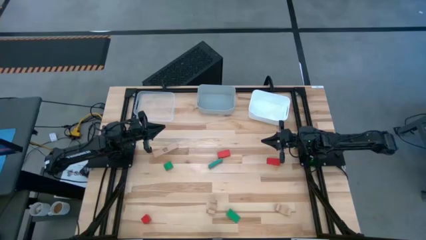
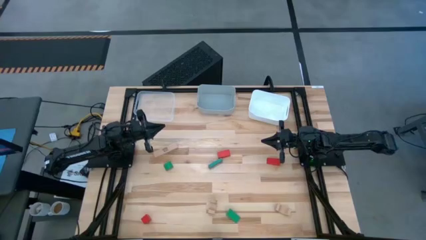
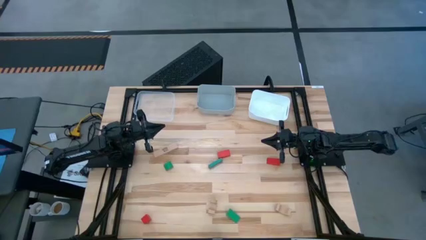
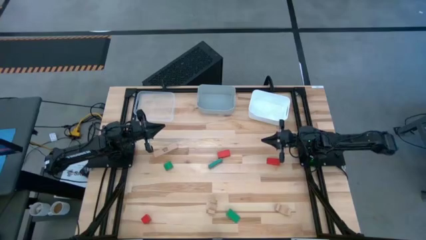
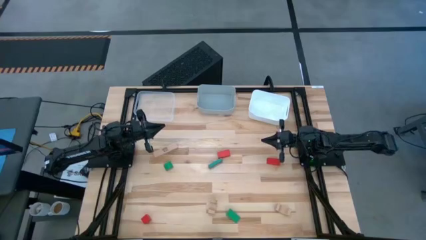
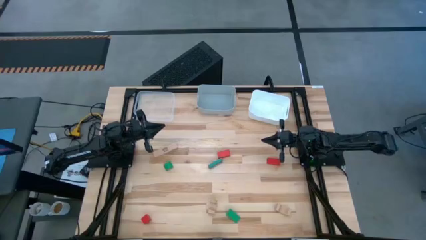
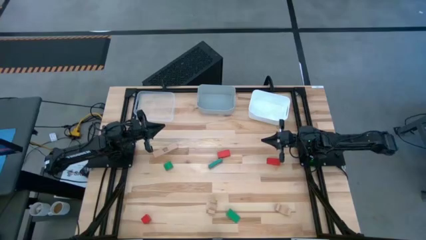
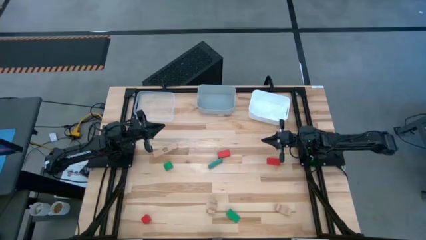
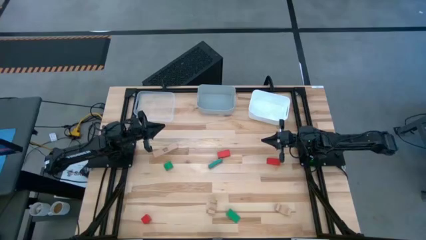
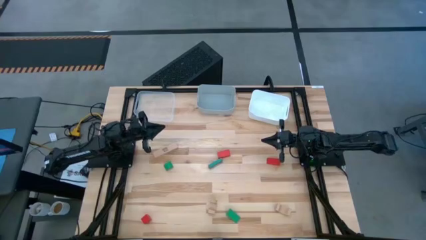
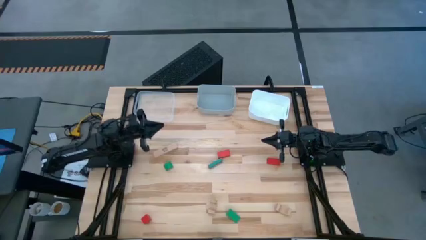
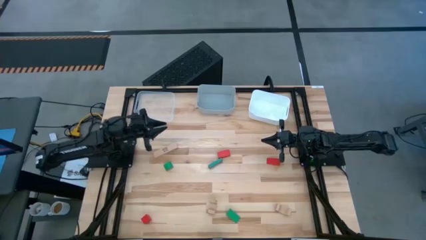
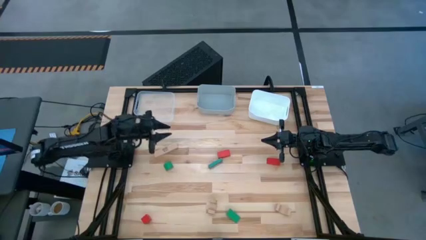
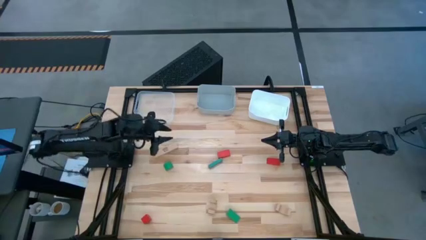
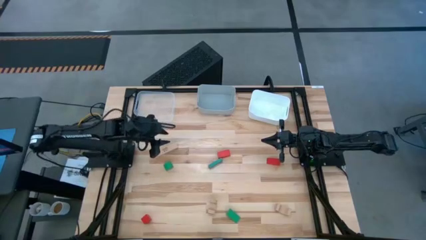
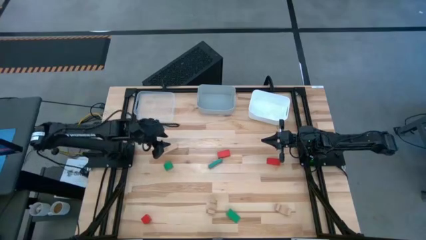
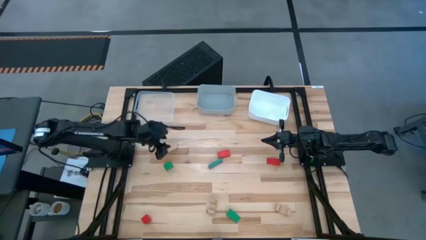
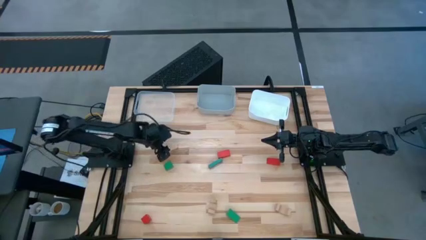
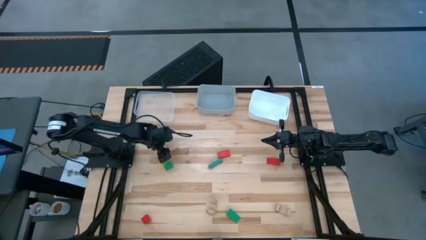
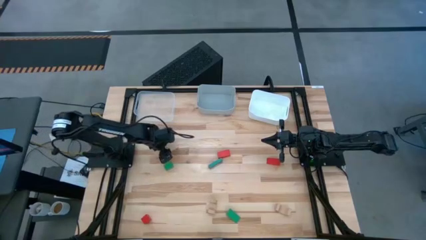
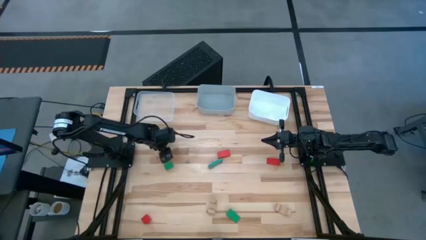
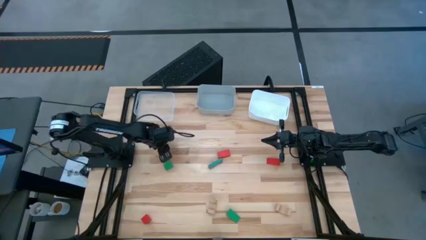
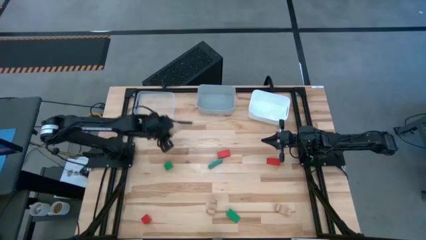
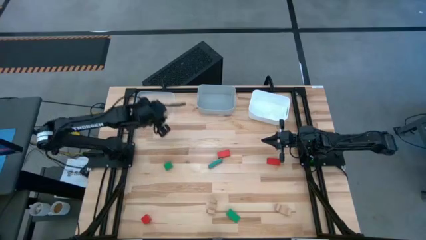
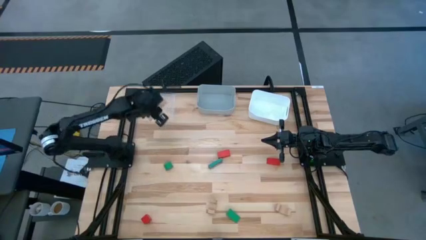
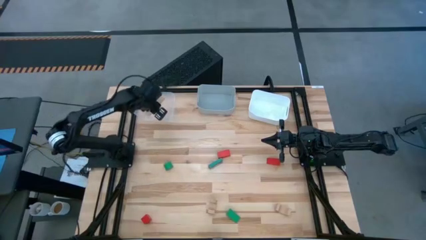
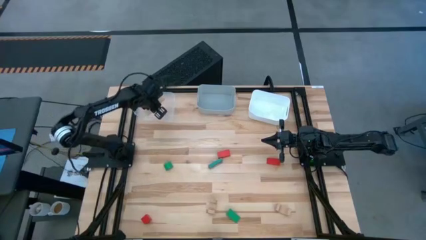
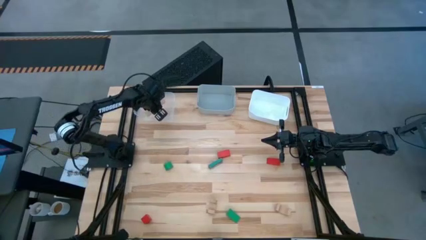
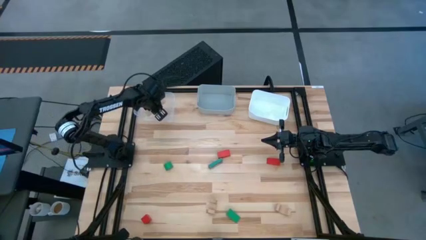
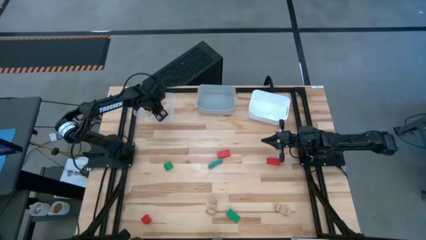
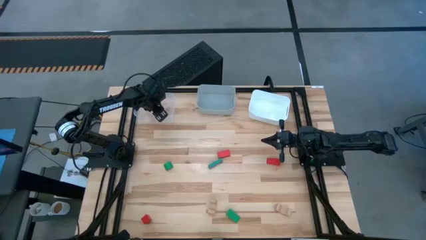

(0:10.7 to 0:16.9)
Task: Sort & place blocks by color
Put the top left brown block into the transparent bin

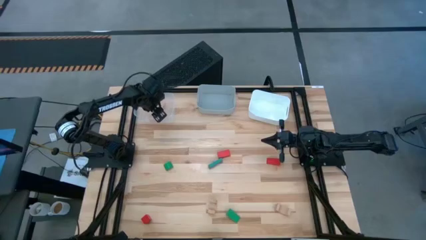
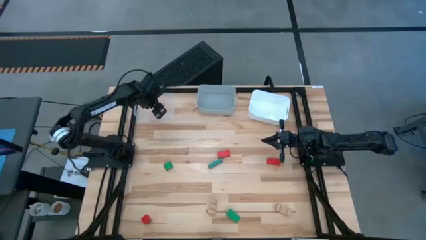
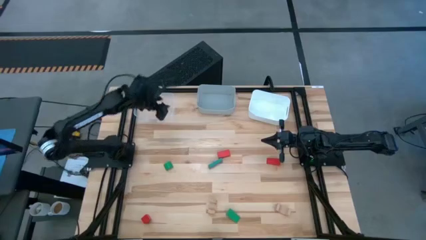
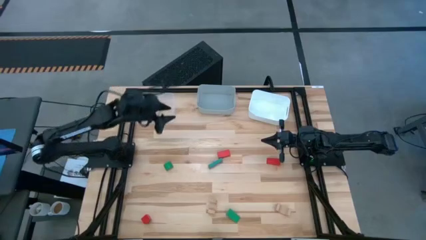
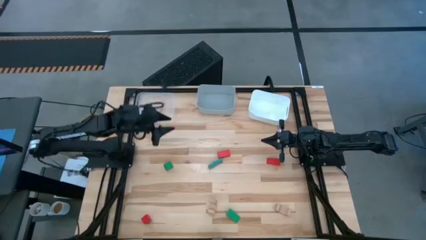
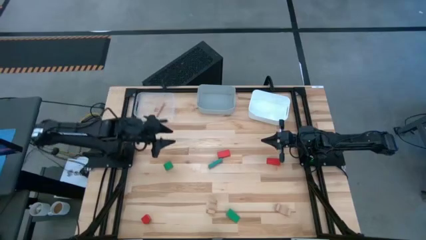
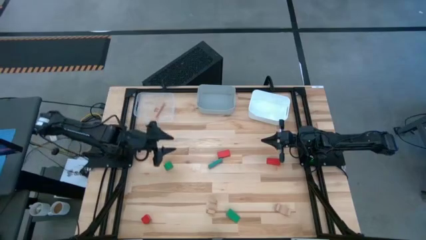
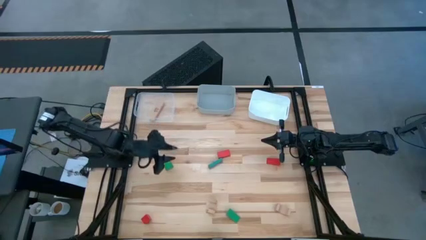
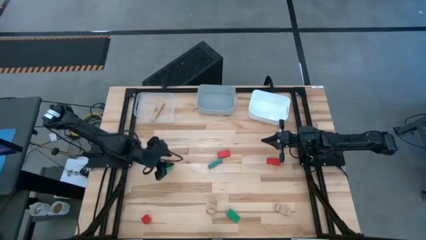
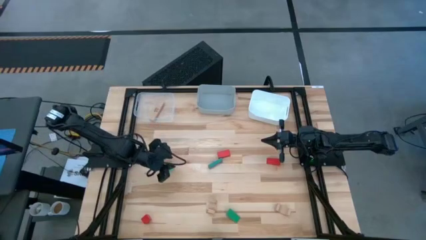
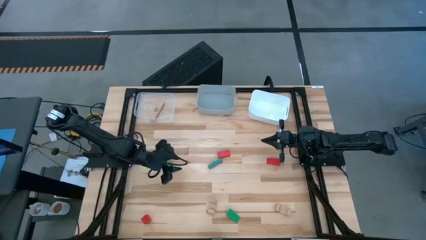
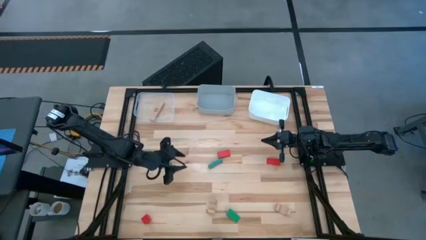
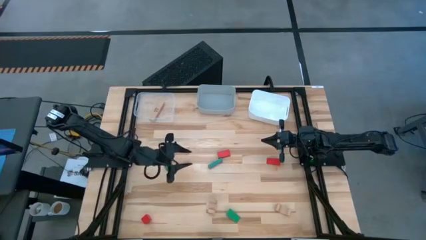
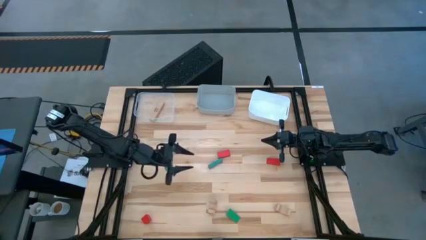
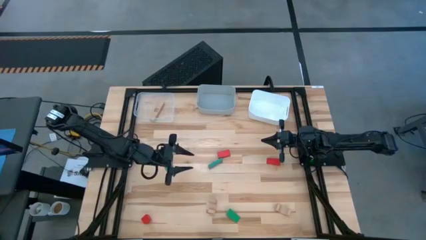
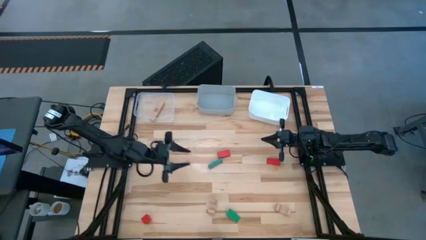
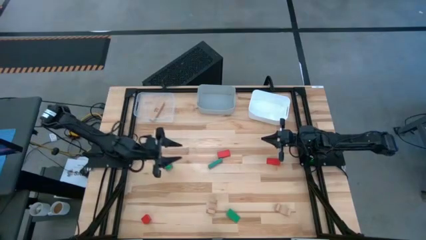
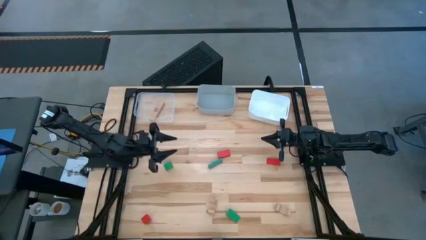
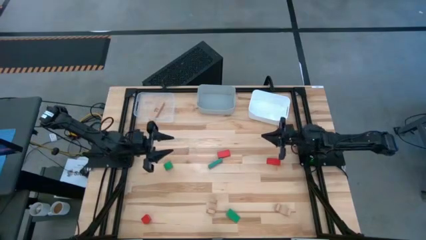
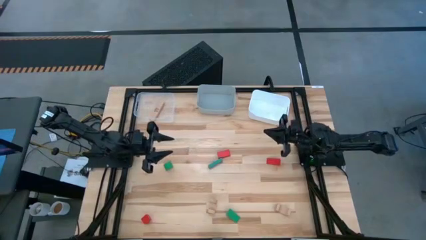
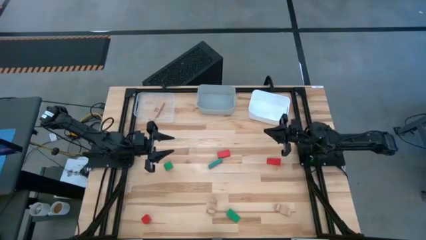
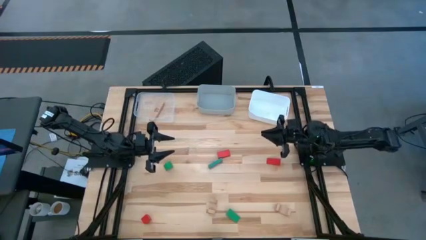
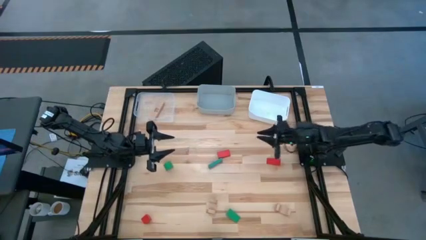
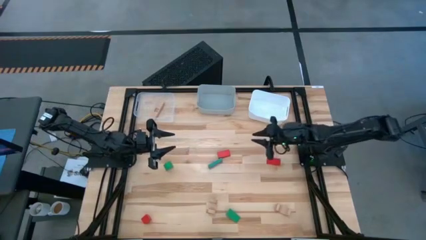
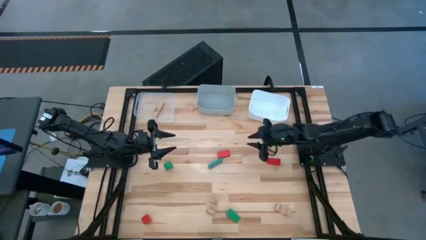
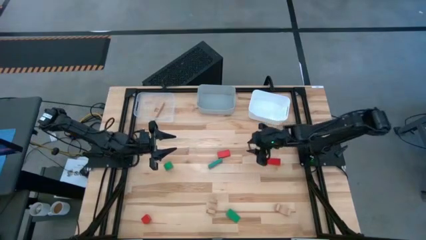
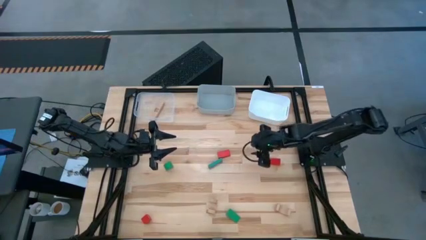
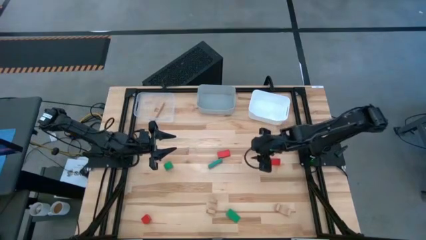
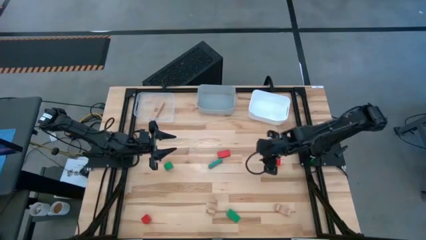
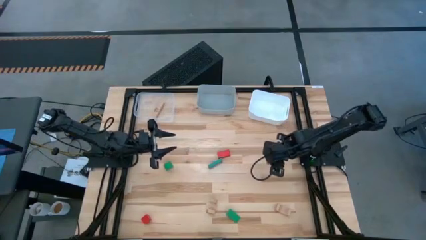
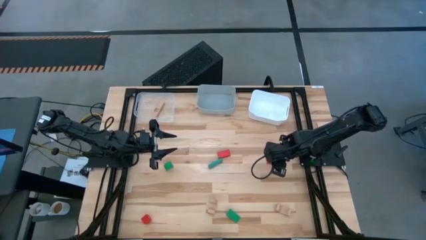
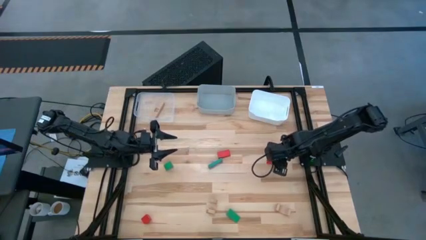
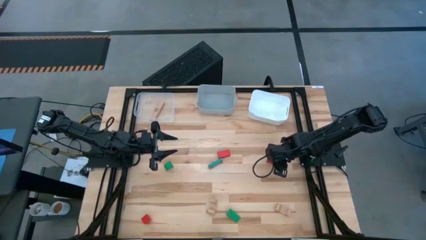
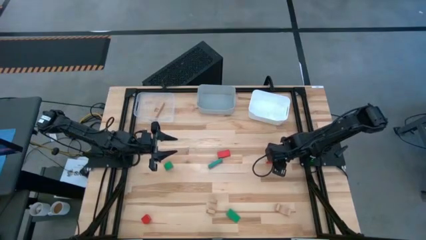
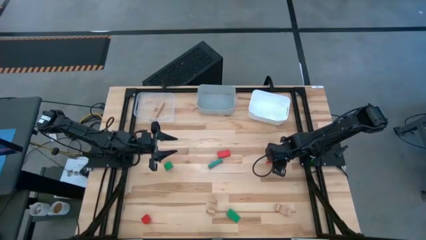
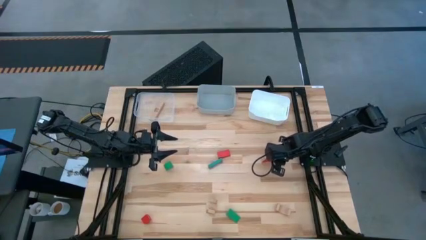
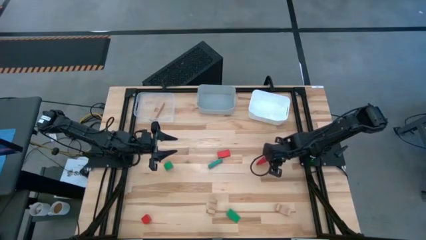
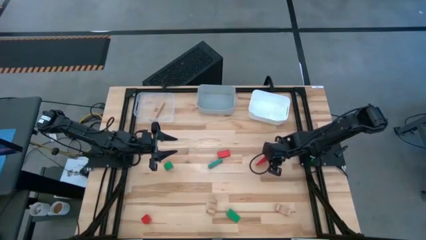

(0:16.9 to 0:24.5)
Put the top right red block into the white bin

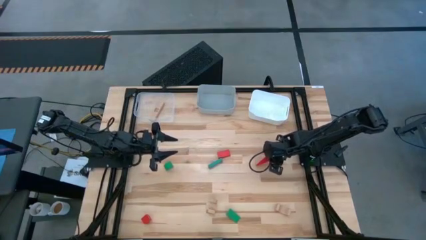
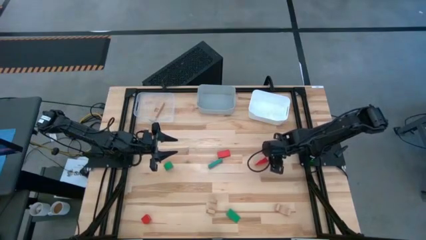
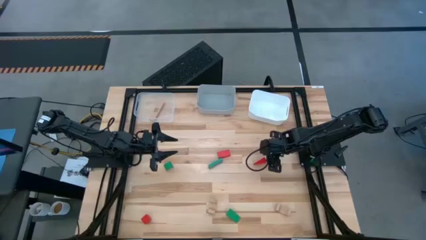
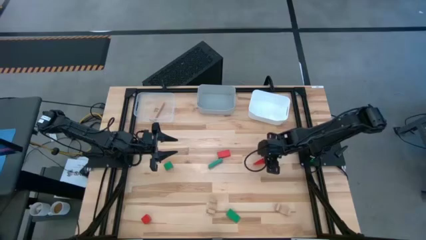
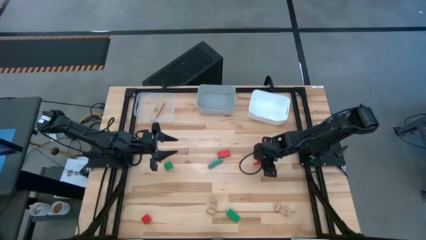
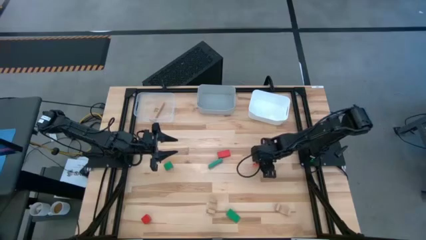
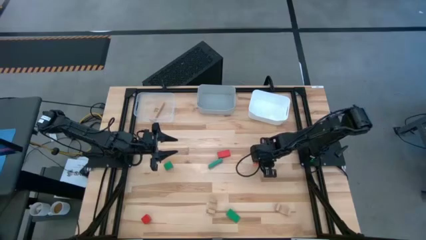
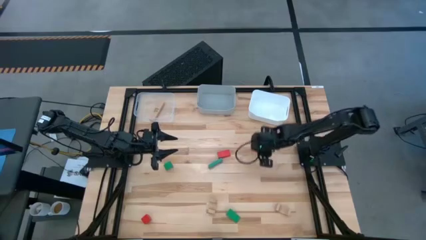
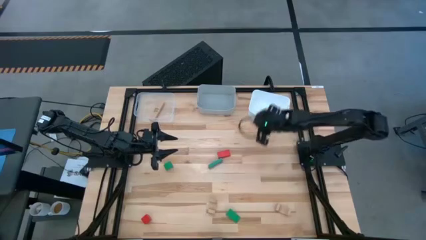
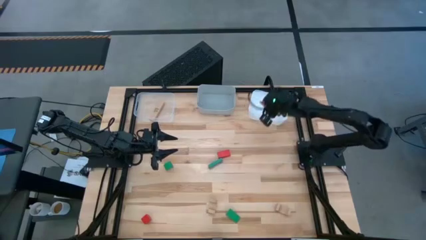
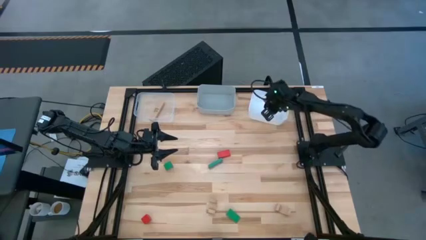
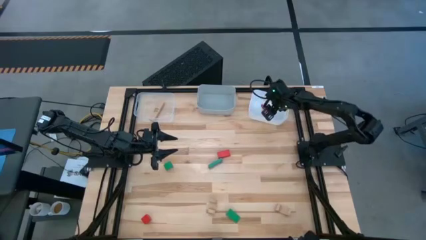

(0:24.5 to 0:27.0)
Put the top right red block into the white bin
